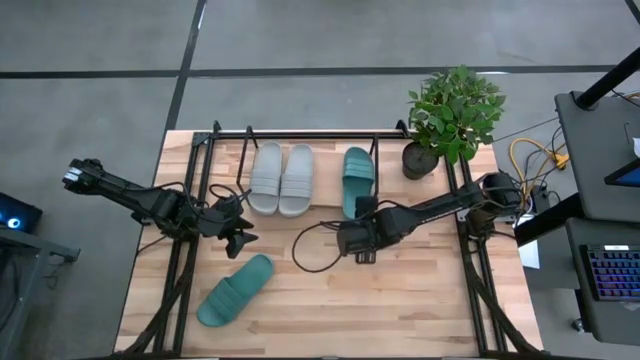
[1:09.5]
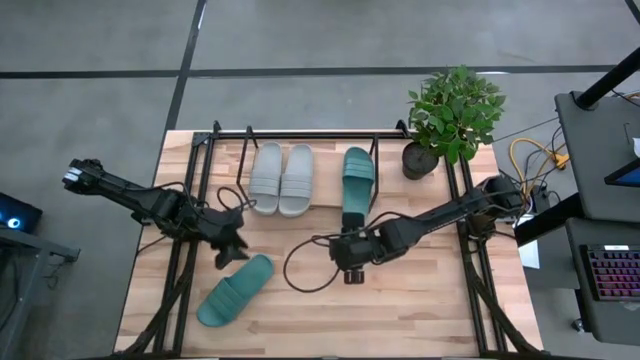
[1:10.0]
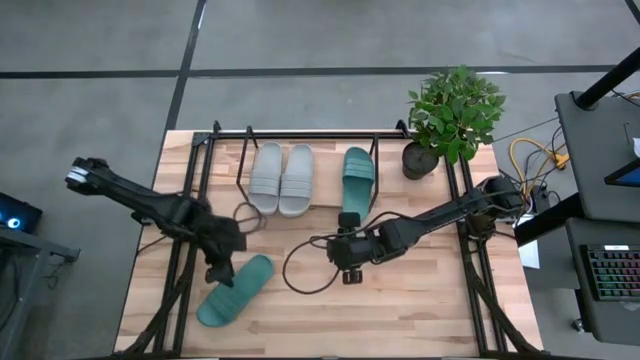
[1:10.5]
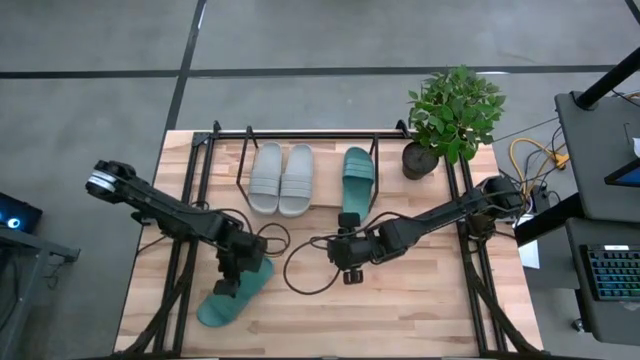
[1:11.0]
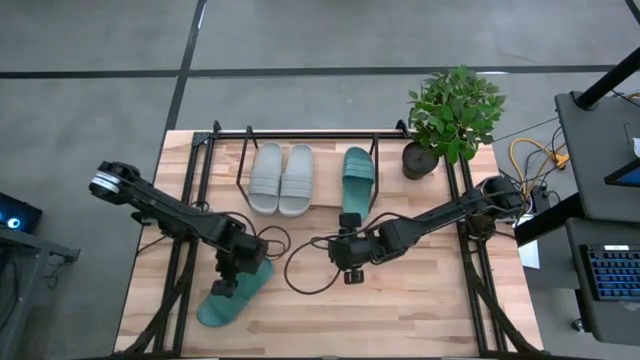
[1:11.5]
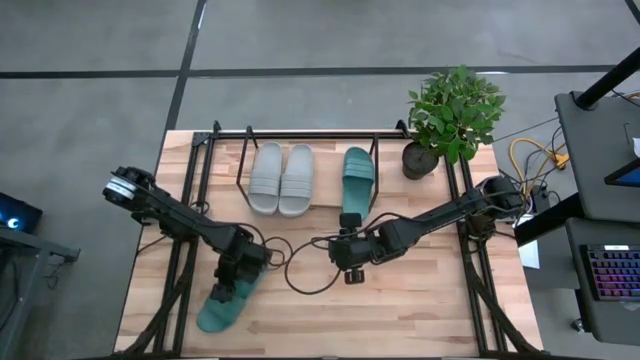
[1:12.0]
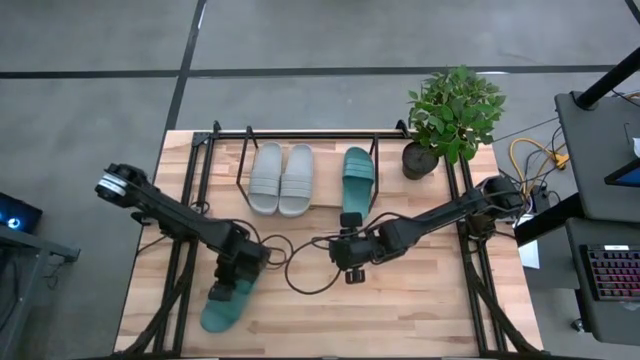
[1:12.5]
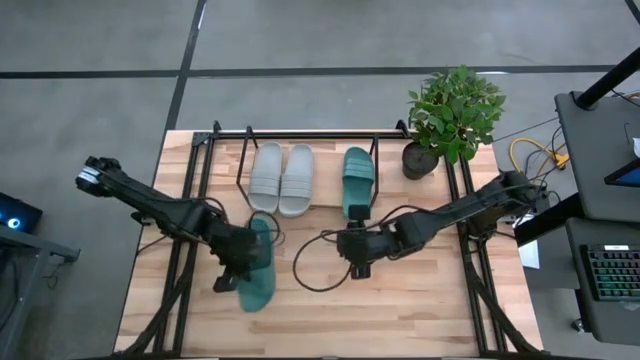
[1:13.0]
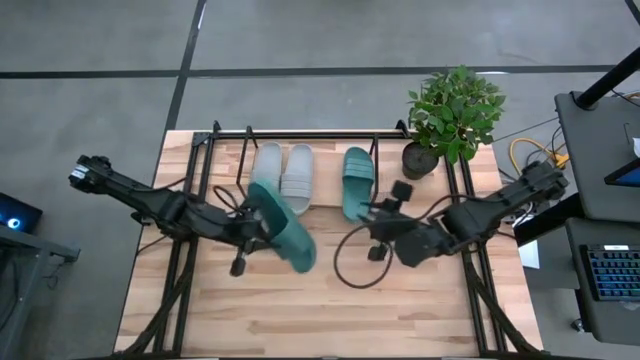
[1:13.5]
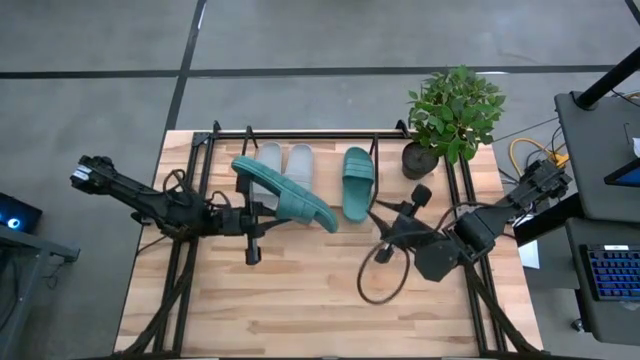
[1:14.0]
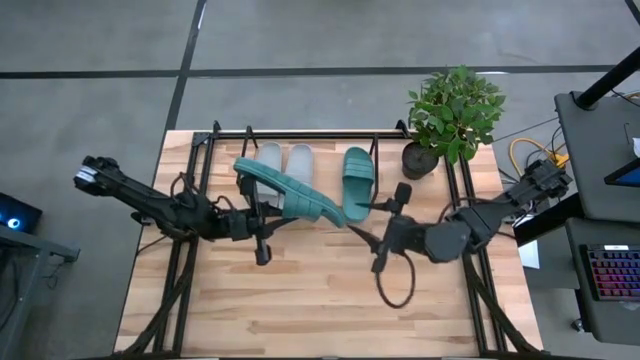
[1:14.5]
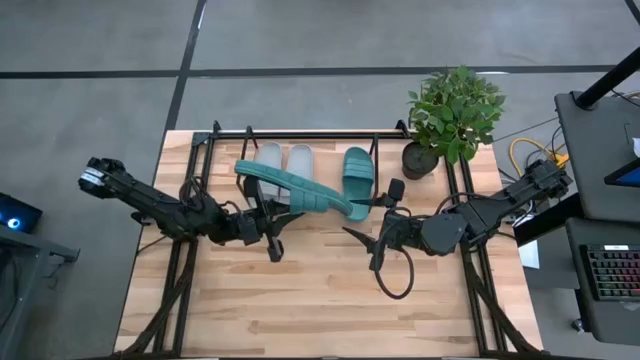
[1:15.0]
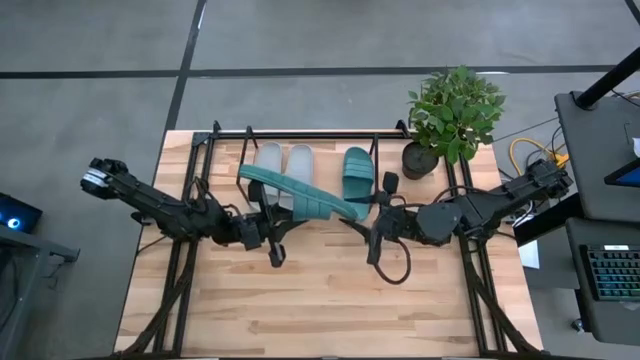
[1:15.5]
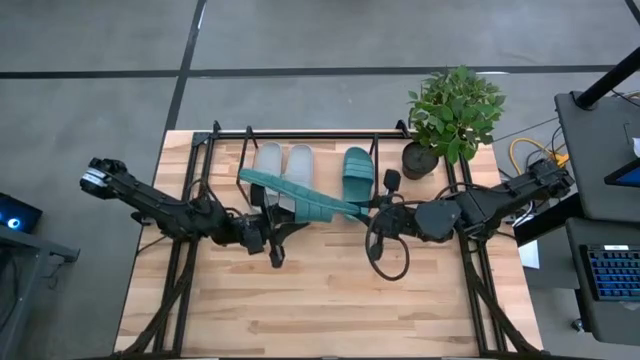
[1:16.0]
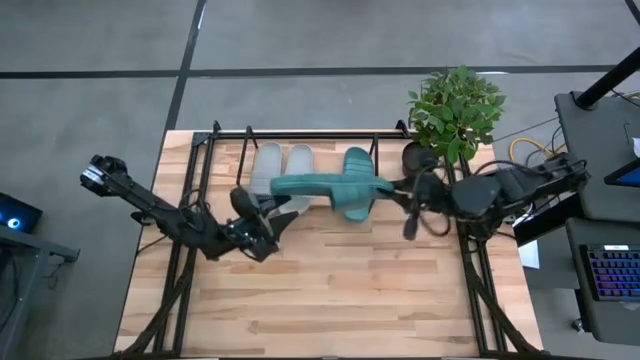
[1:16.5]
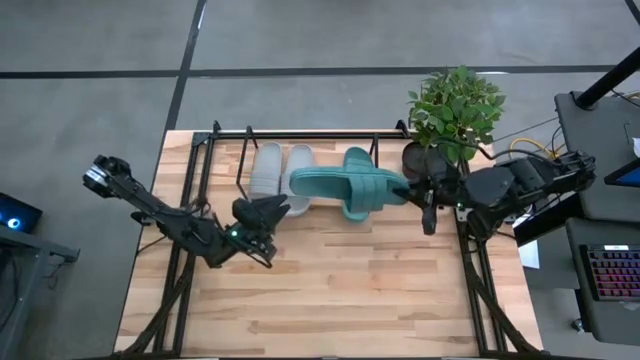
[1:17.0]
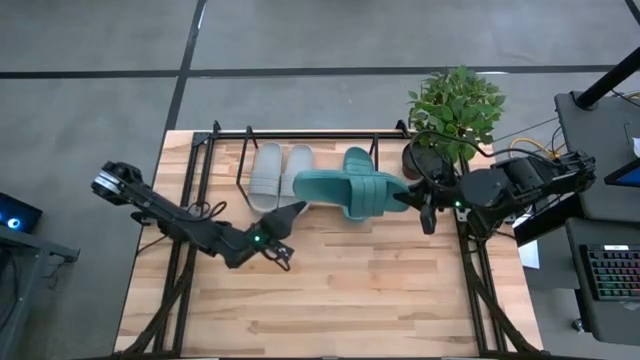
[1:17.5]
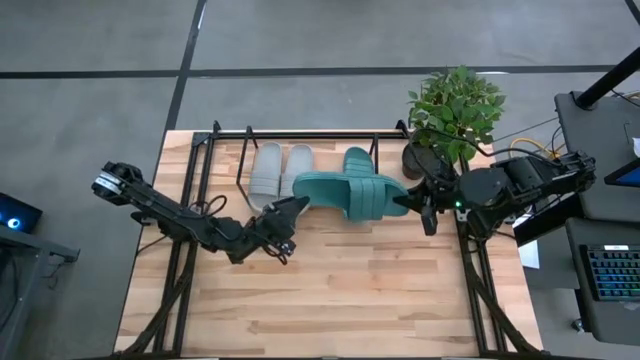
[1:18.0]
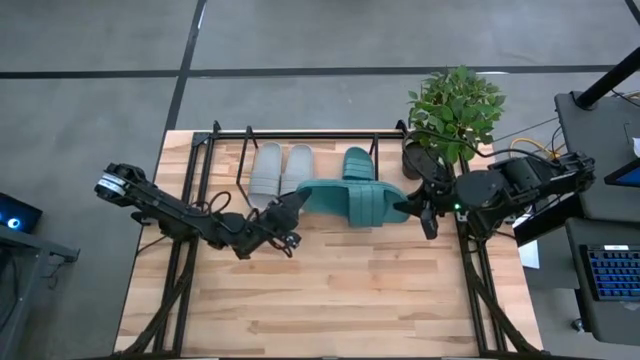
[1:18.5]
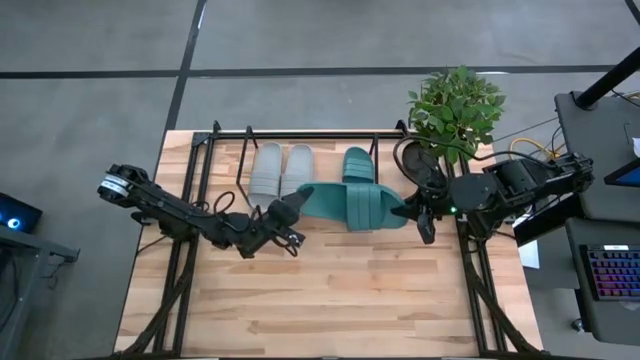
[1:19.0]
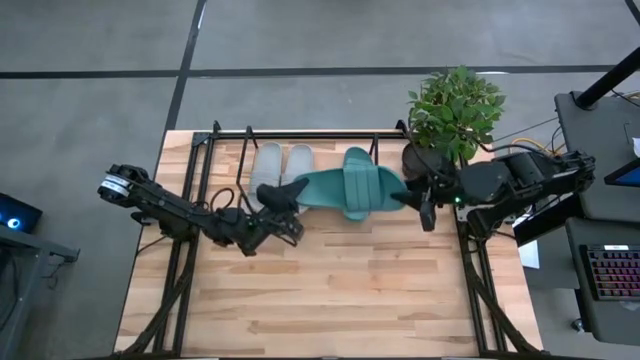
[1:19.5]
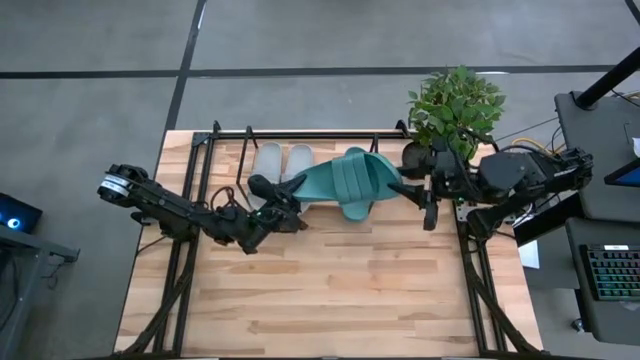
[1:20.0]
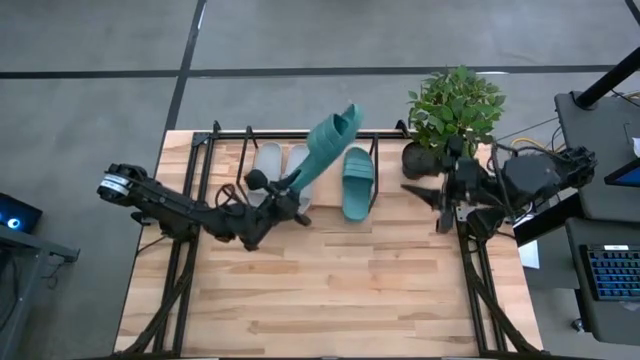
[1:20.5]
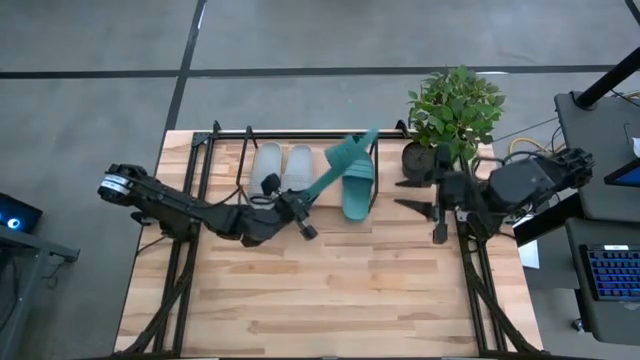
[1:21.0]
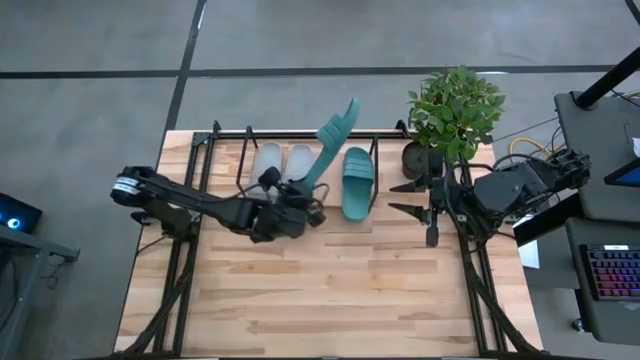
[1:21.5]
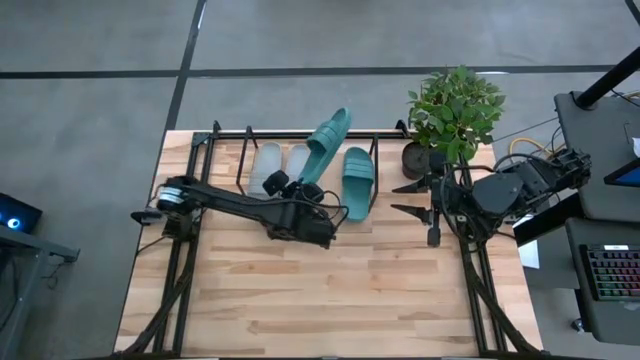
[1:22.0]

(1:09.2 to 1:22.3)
Task: Pick and place slides into the shelf
Put the green slide on the shelf

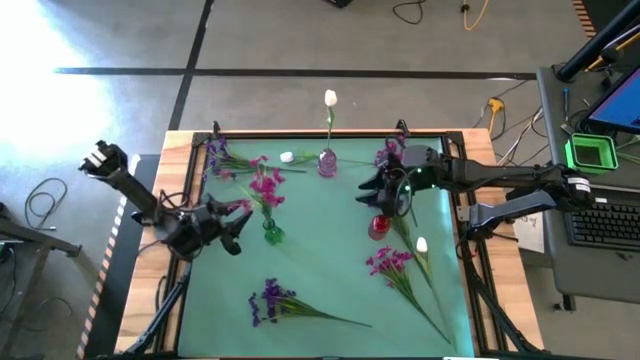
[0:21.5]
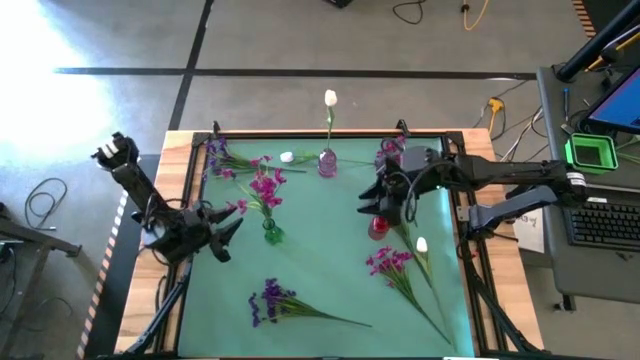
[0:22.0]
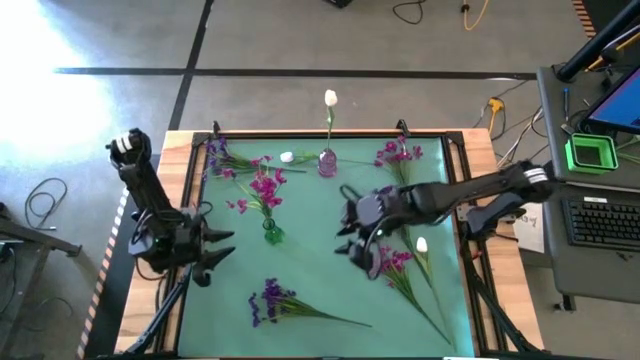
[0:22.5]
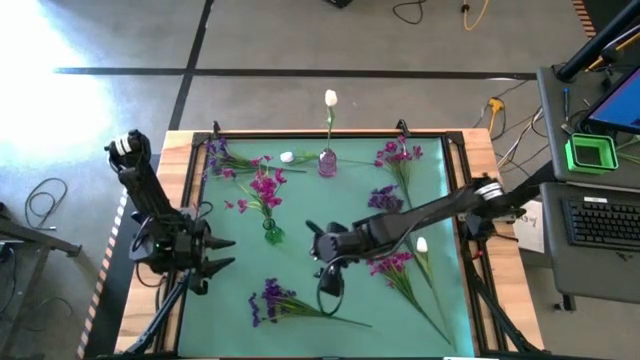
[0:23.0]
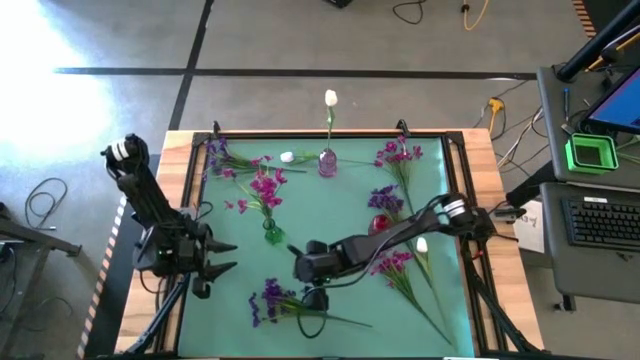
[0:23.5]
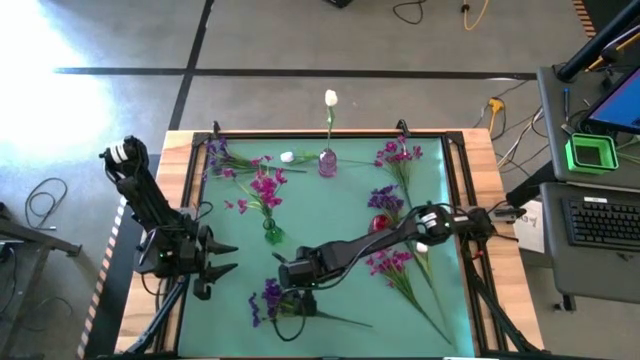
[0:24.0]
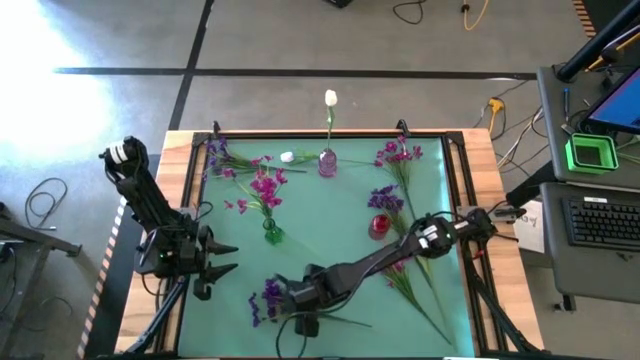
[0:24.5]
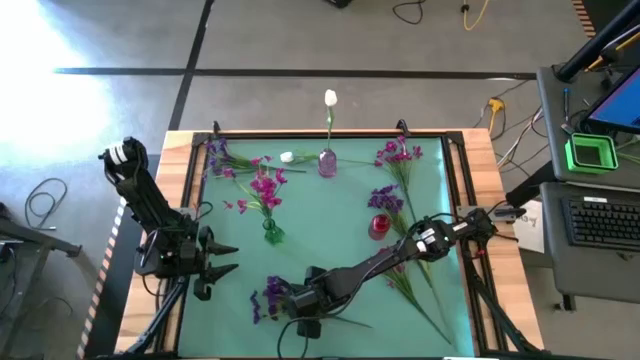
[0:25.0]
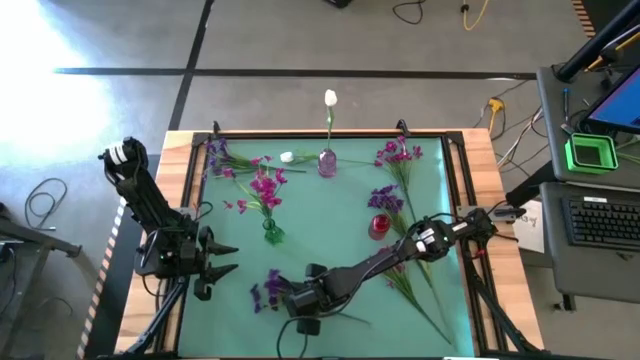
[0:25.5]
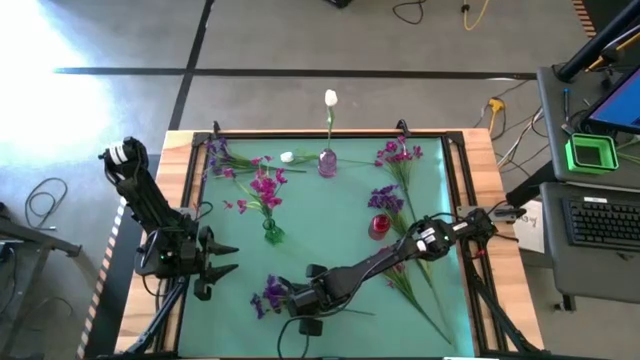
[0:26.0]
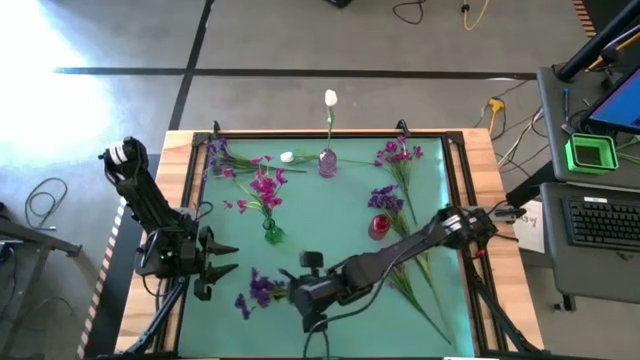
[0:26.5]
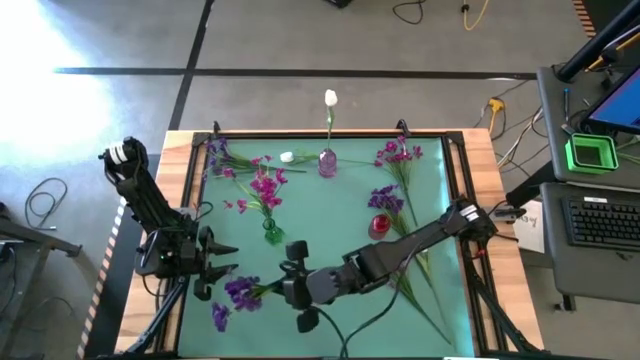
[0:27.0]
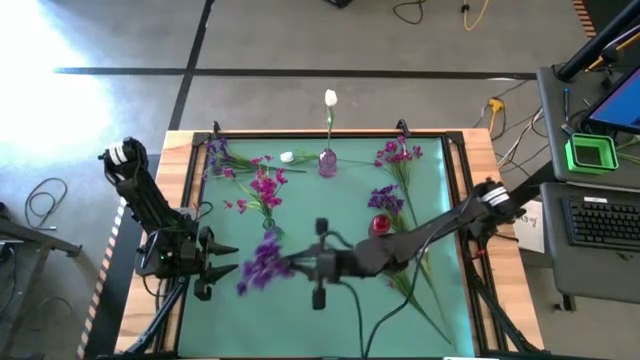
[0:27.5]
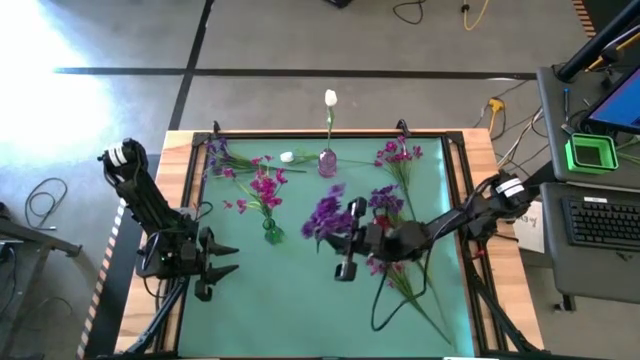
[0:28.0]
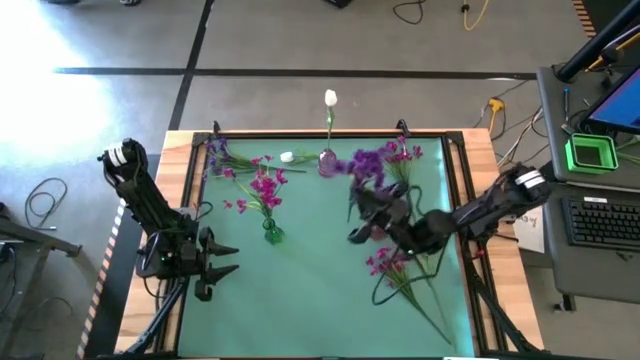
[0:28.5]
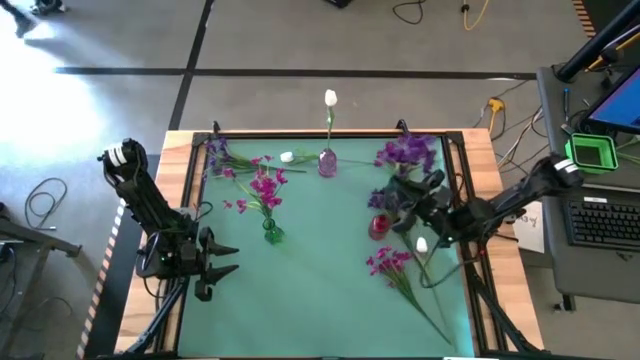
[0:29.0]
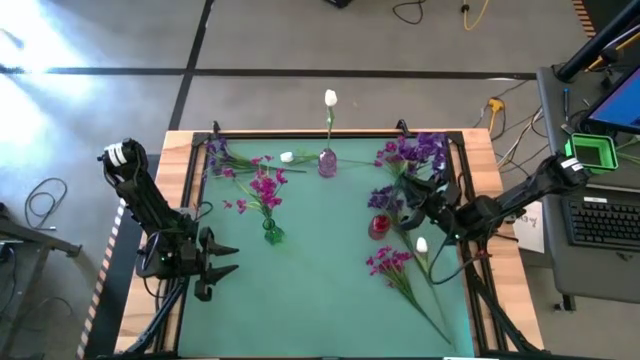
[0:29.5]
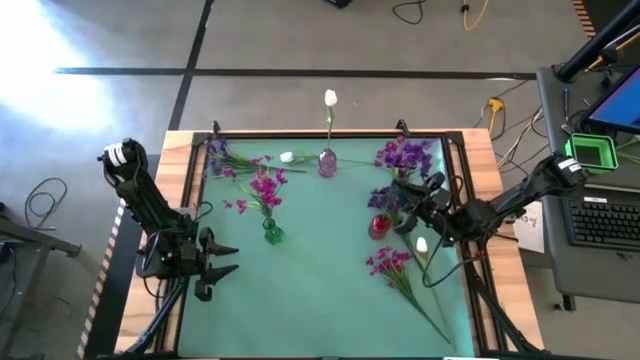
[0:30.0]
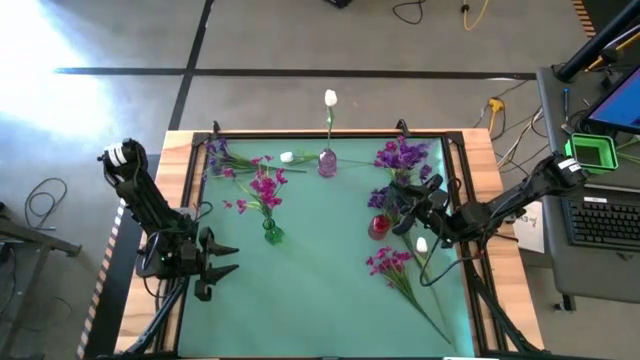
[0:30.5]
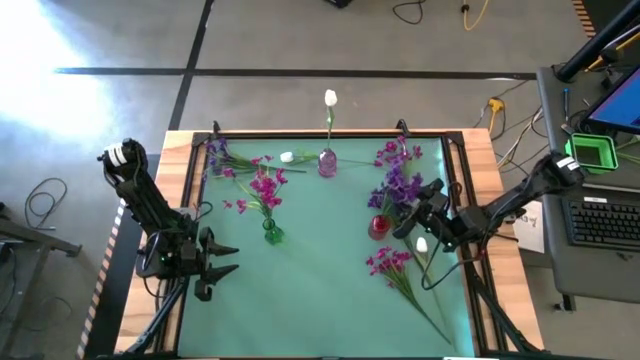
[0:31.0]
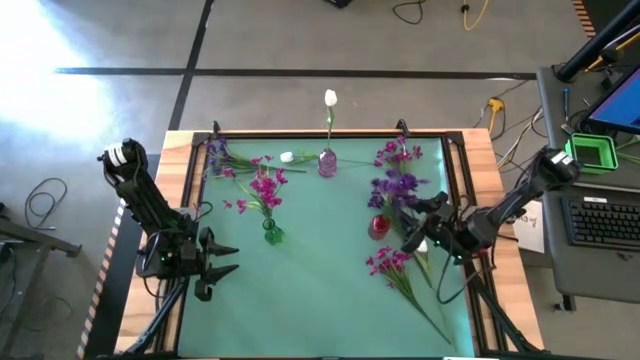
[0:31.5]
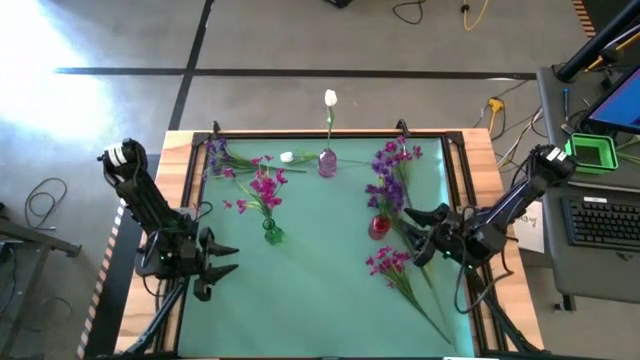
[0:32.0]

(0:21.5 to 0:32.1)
Task: Sort flowers into vase by color
Put the bottom violet flowers into the red flower vase
